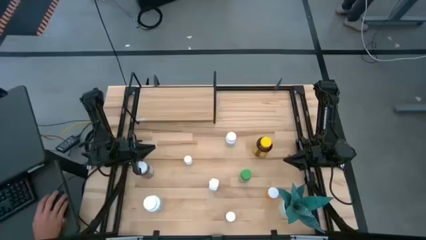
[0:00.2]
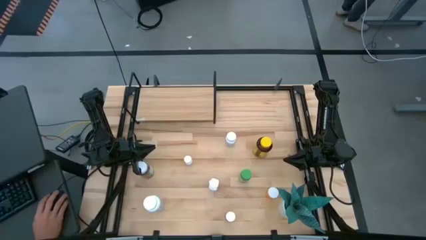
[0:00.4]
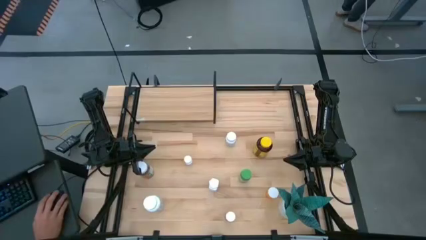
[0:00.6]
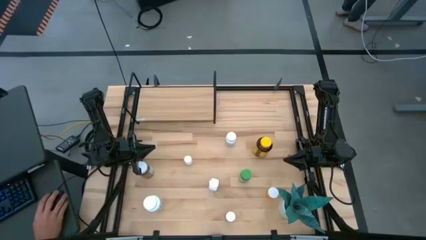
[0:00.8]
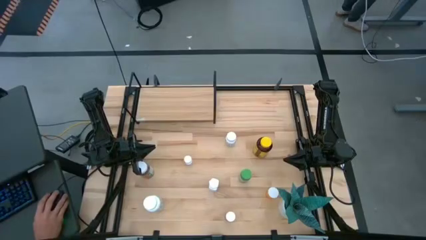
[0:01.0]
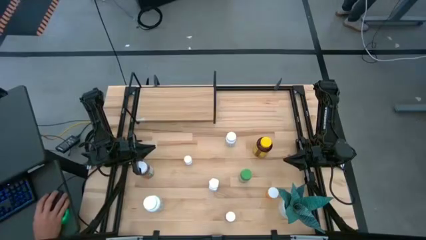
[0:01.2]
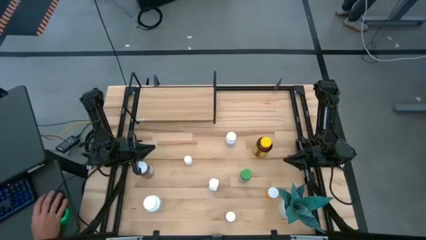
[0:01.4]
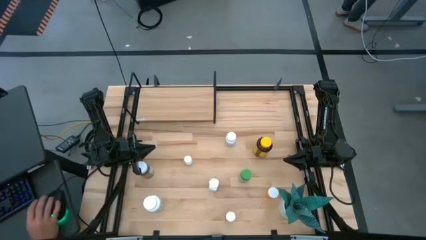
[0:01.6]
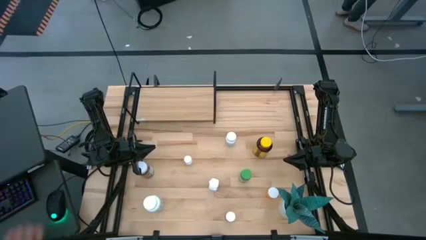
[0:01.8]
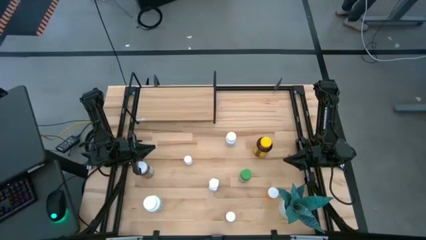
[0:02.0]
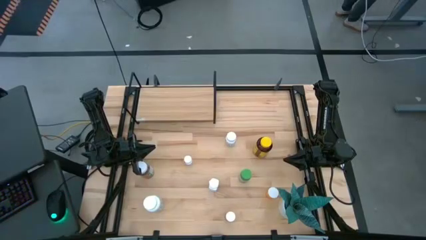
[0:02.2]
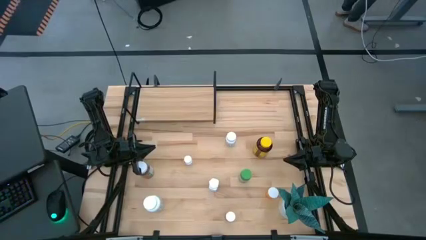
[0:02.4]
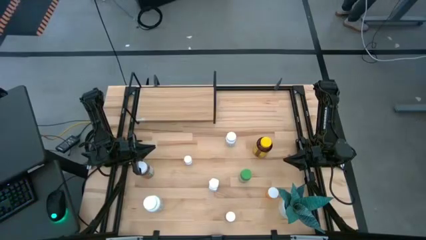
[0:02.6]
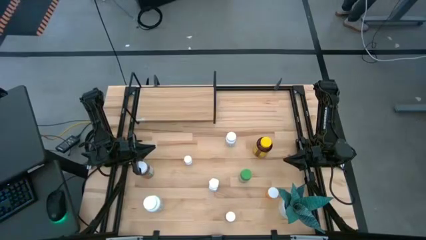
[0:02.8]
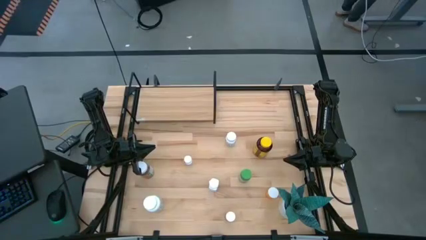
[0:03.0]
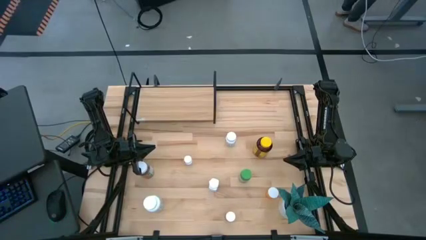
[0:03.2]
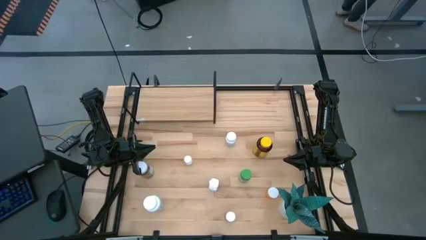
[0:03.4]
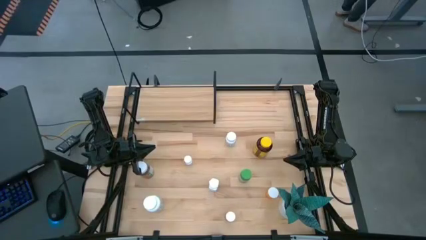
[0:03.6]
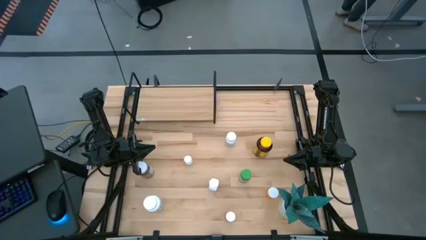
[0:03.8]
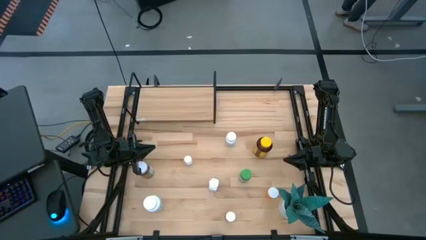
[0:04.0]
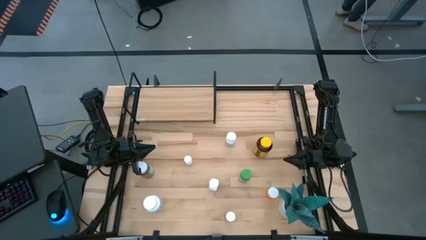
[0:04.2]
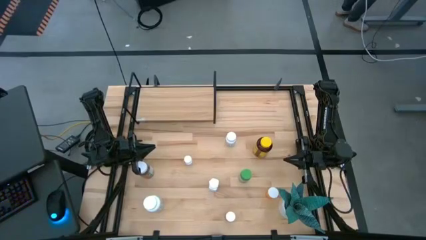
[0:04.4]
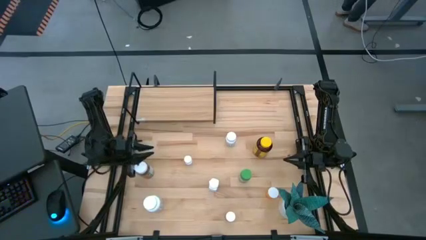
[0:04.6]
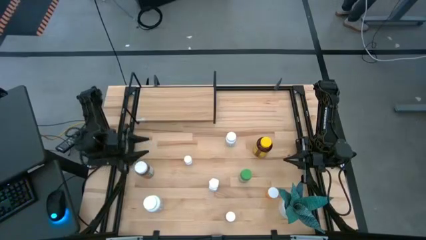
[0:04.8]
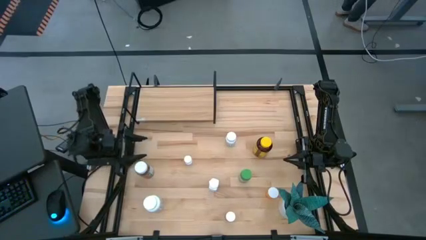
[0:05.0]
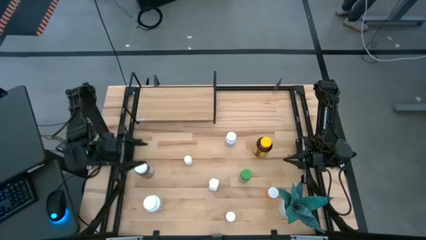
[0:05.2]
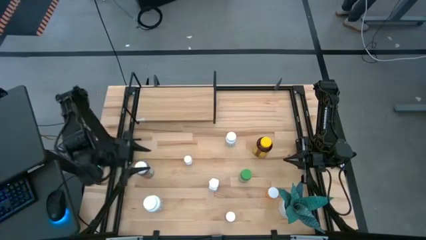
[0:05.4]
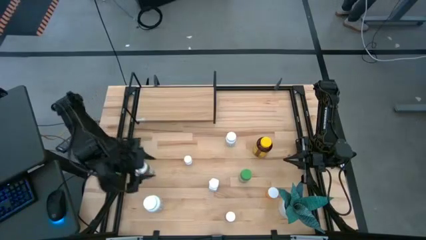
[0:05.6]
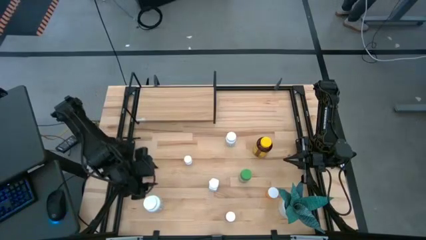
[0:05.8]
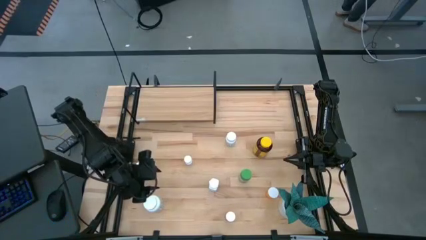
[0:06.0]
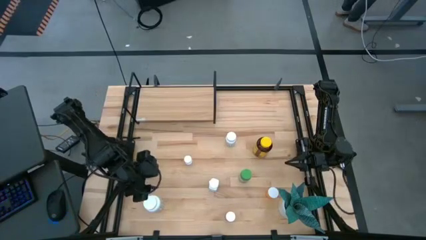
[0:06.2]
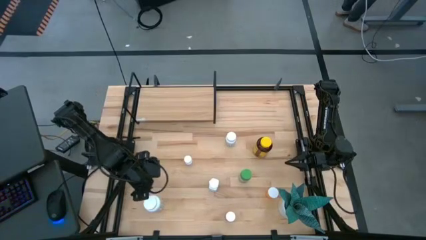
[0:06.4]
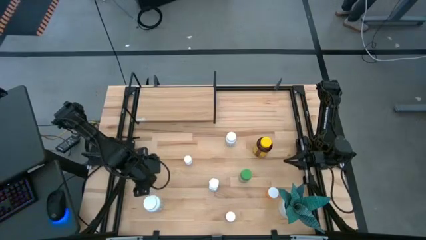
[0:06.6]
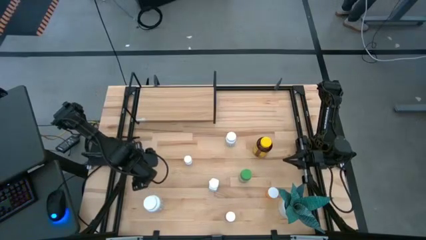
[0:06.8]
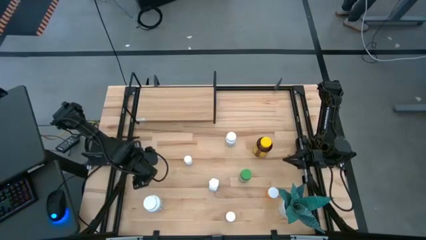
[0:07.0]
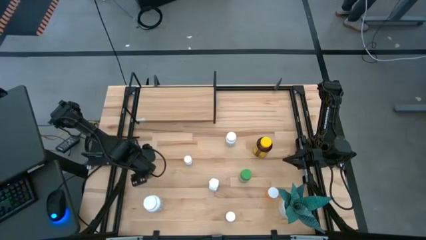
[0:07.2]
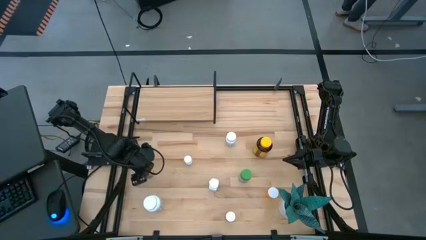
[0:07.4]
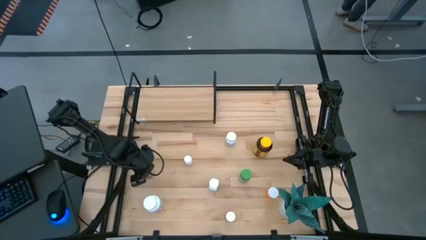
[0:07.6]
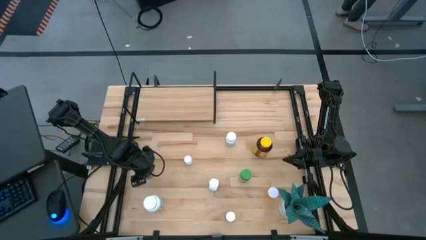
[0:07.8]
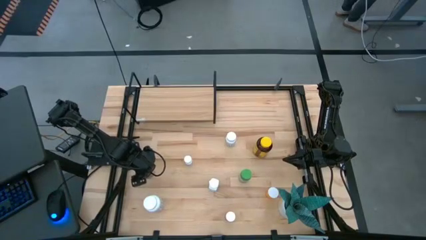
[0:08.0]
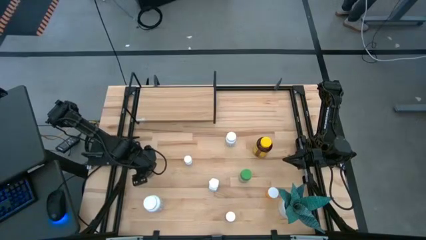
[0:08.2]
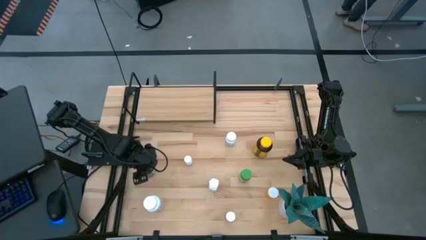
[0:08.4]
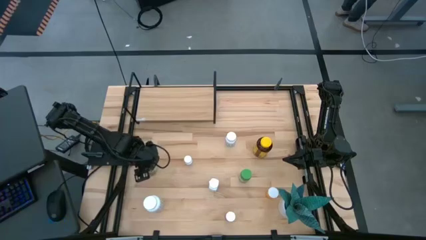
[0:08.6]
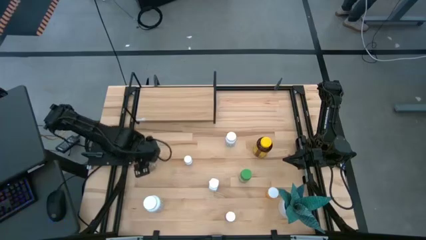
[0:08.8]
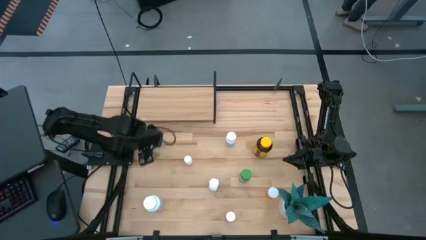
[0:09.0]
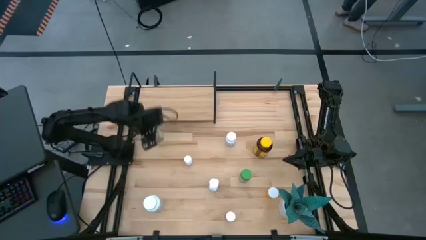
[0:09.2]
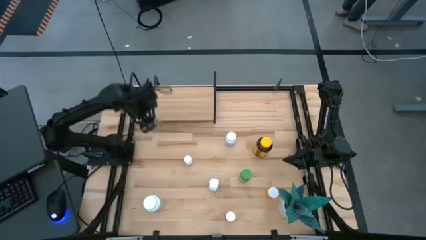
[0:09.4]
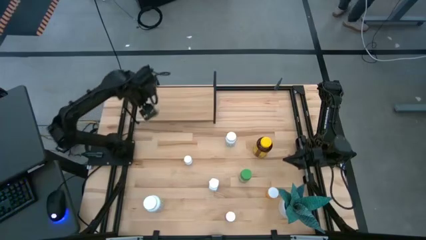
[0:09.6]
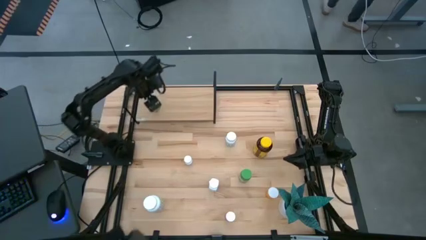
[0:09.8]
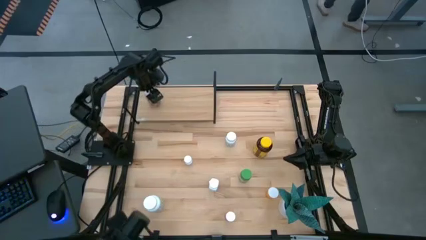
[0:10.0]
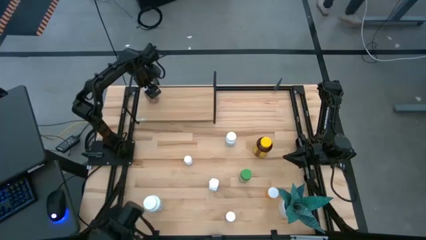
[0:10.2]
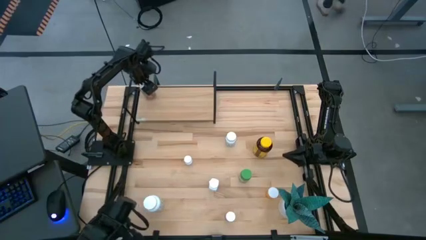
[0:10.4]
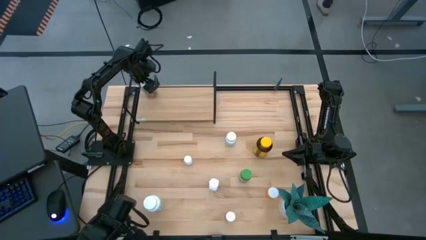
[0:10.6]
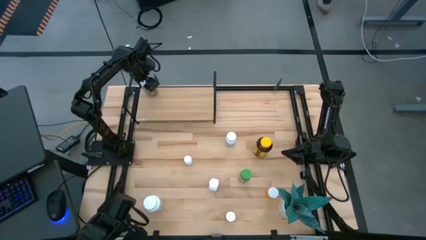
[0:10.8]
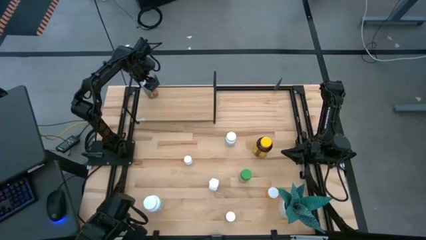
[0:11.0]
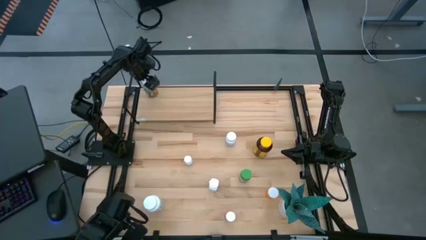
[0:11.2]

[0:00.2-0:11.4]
Task: Pick and place medicine bottles onto shelf by color
Put the transparent pill bottle on the shelf
